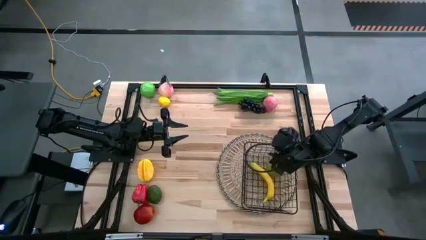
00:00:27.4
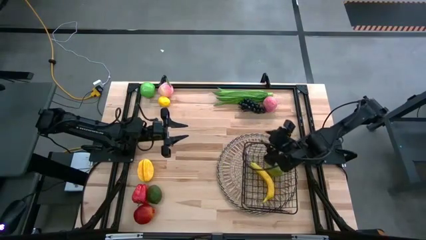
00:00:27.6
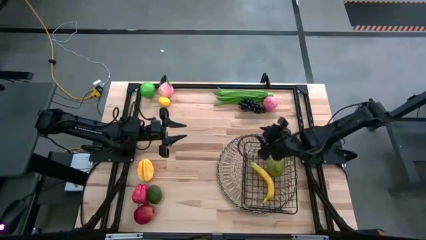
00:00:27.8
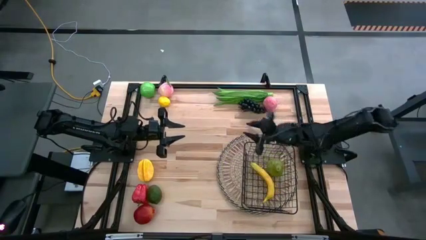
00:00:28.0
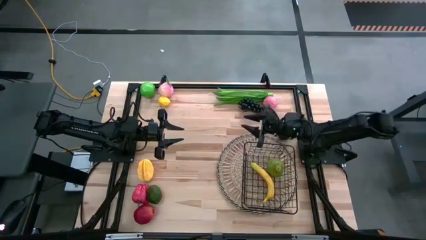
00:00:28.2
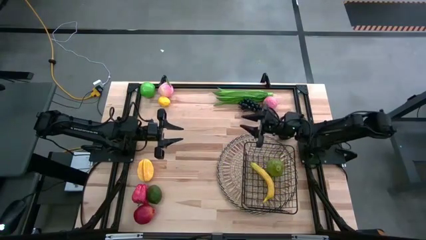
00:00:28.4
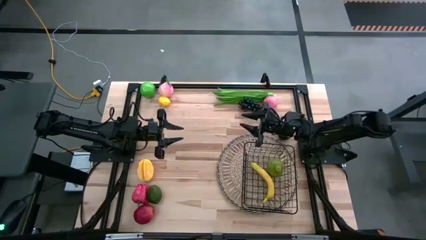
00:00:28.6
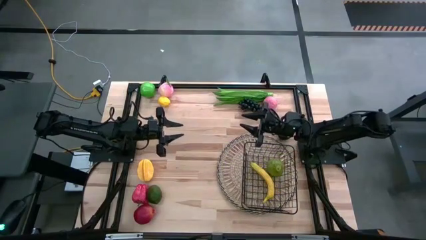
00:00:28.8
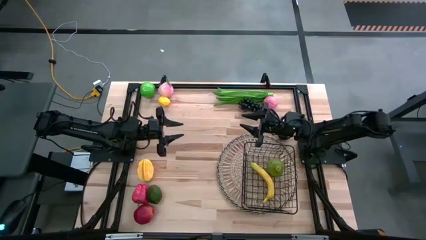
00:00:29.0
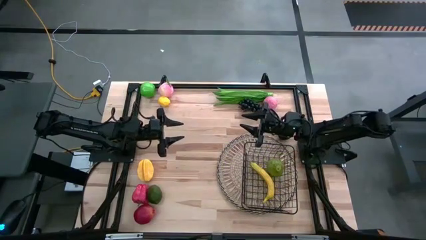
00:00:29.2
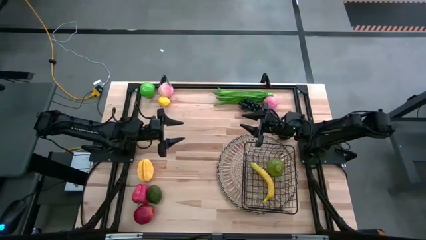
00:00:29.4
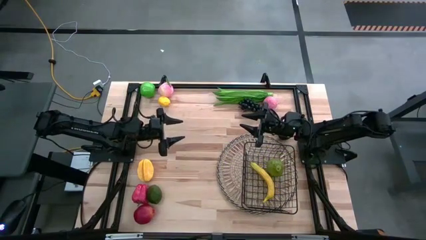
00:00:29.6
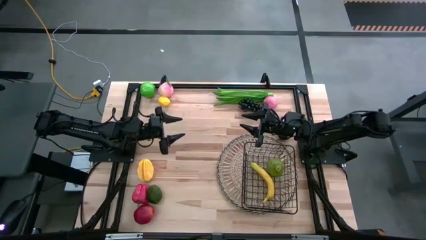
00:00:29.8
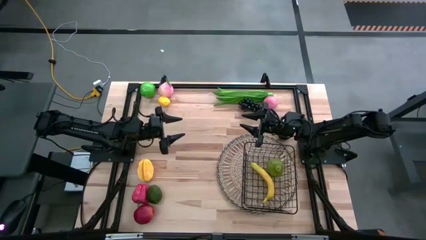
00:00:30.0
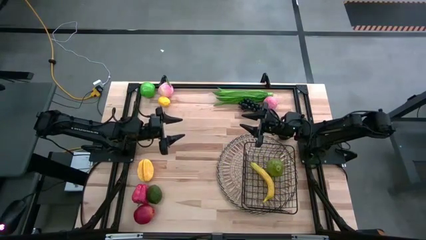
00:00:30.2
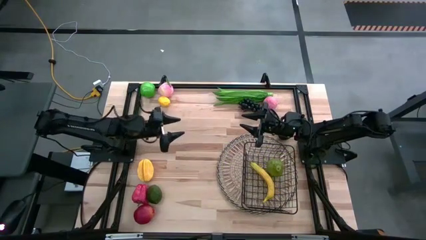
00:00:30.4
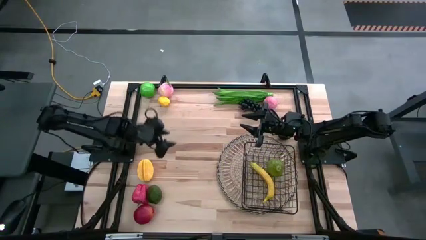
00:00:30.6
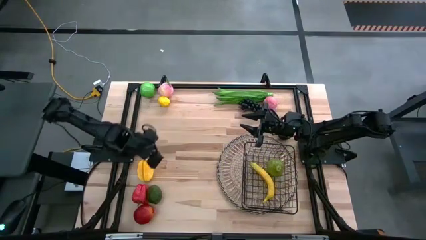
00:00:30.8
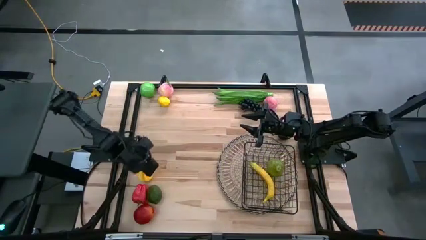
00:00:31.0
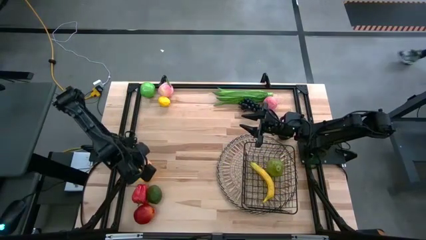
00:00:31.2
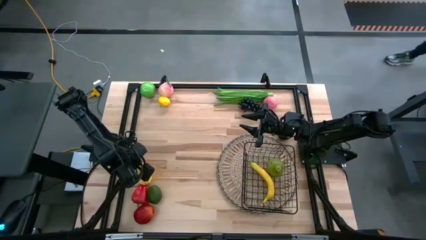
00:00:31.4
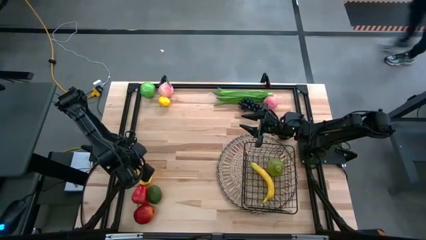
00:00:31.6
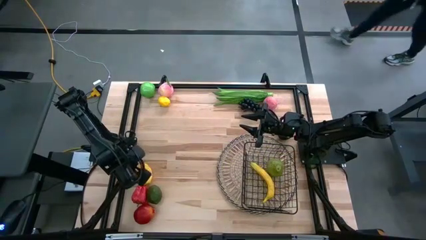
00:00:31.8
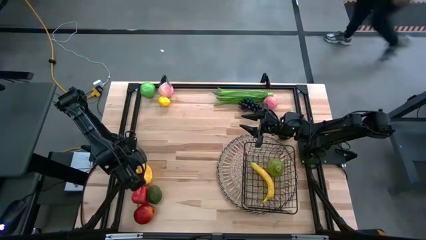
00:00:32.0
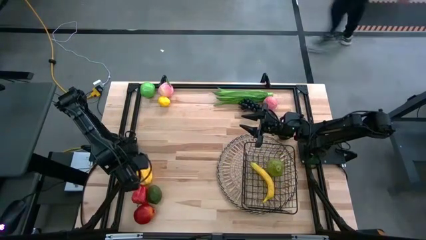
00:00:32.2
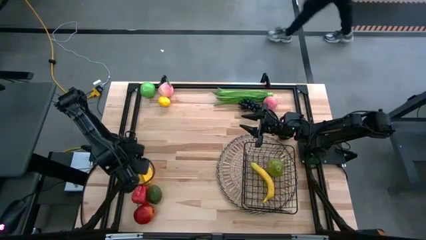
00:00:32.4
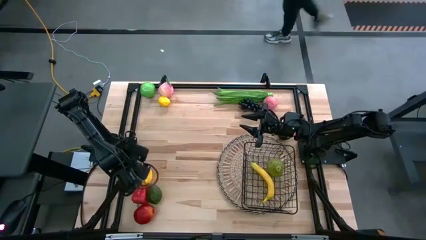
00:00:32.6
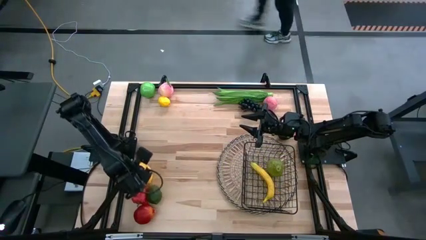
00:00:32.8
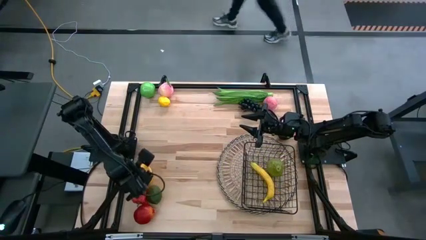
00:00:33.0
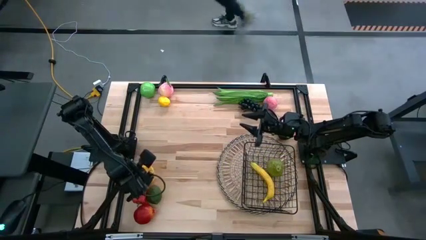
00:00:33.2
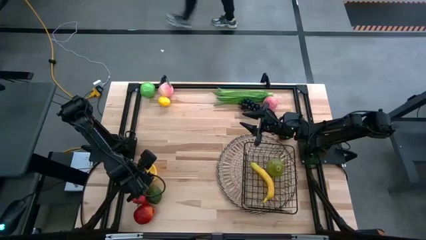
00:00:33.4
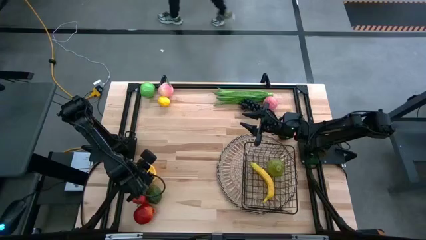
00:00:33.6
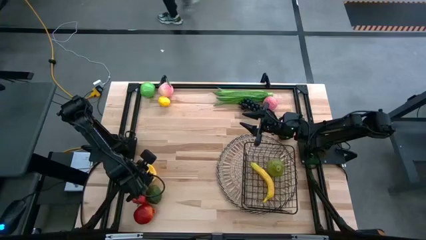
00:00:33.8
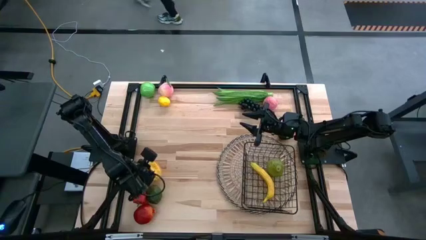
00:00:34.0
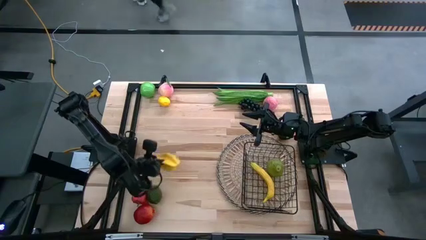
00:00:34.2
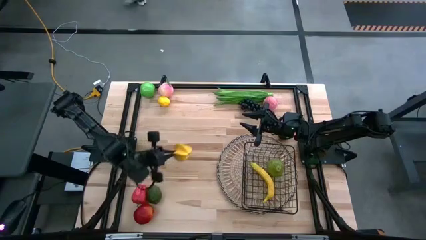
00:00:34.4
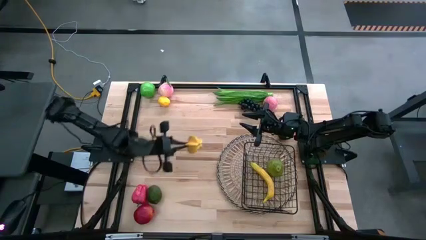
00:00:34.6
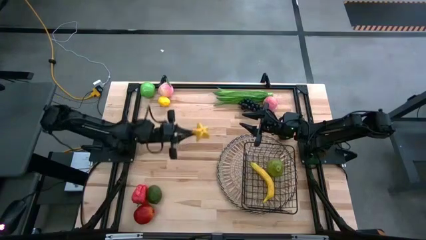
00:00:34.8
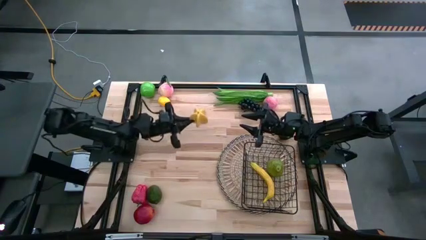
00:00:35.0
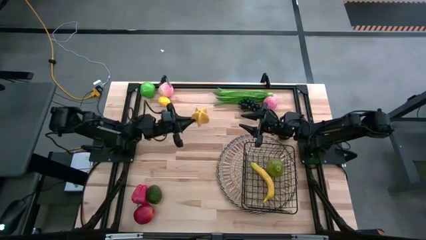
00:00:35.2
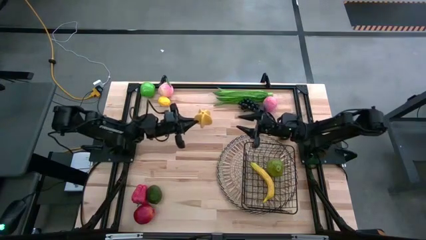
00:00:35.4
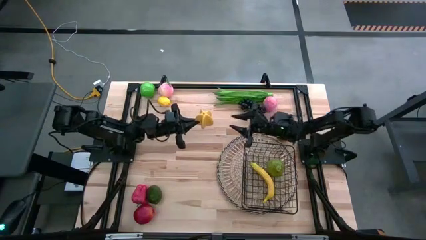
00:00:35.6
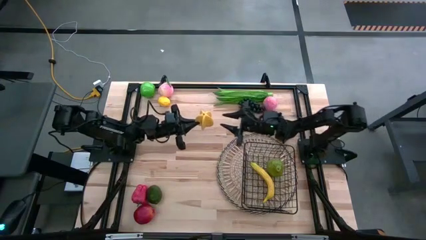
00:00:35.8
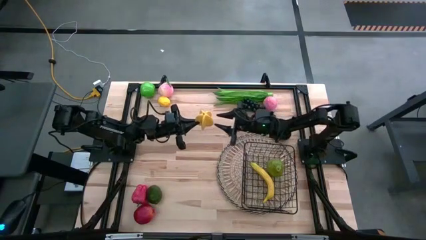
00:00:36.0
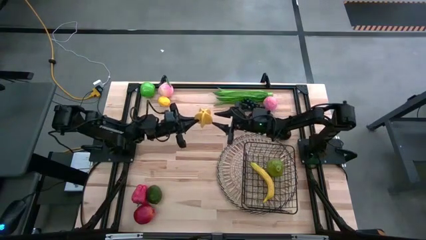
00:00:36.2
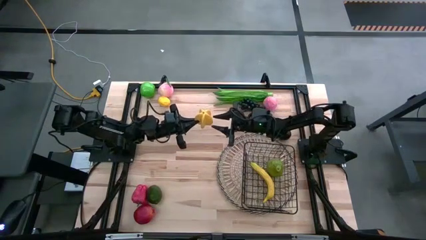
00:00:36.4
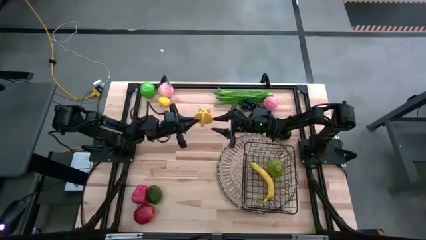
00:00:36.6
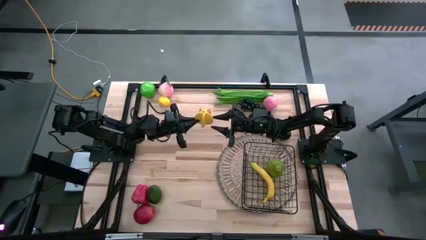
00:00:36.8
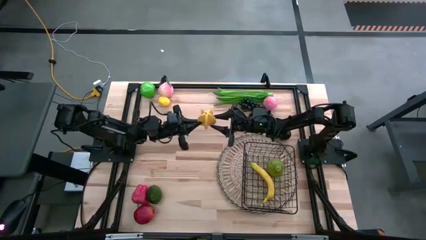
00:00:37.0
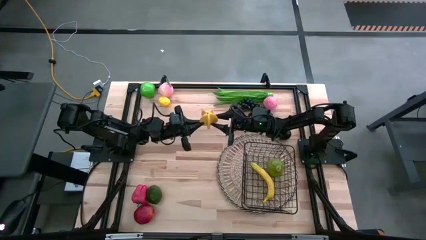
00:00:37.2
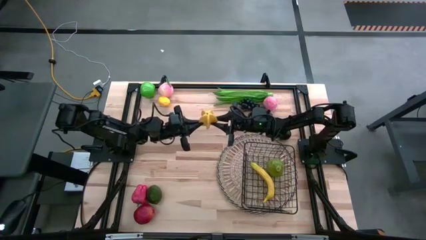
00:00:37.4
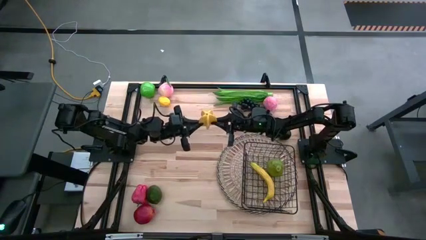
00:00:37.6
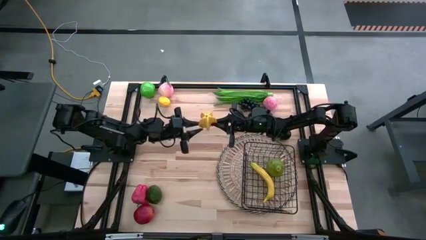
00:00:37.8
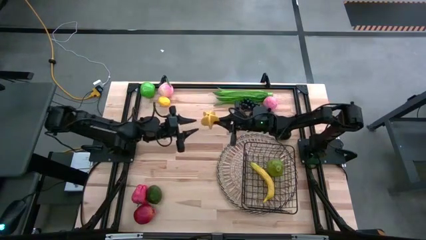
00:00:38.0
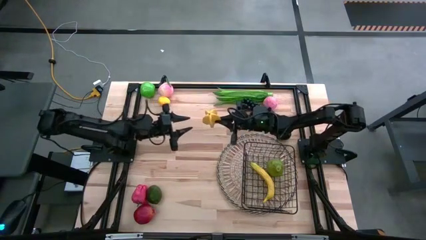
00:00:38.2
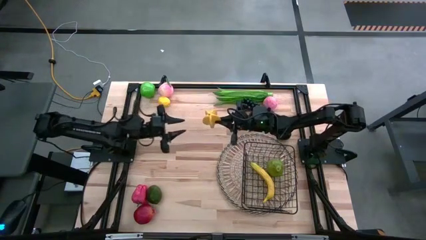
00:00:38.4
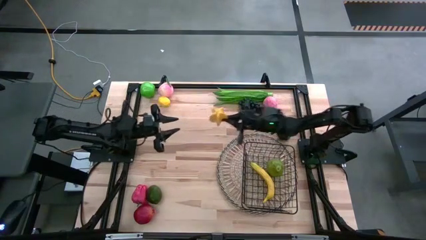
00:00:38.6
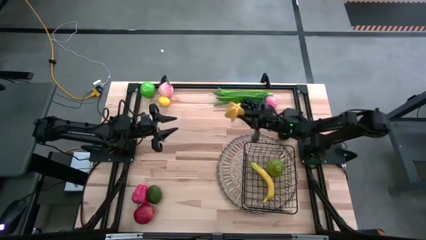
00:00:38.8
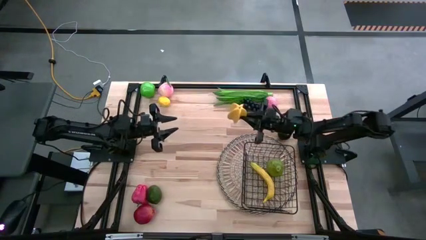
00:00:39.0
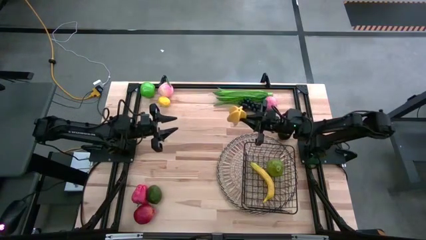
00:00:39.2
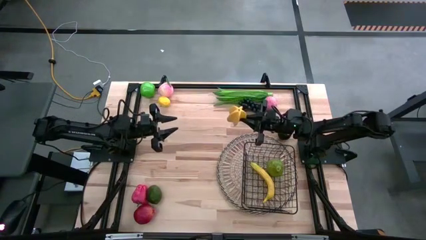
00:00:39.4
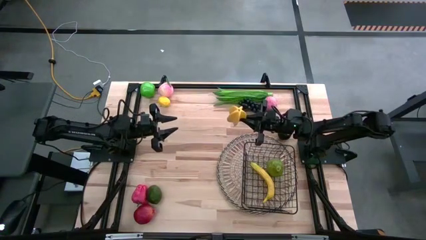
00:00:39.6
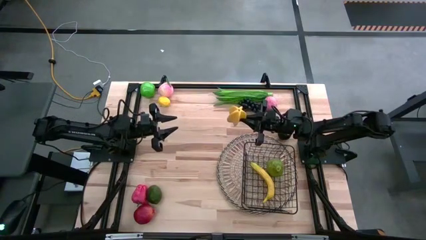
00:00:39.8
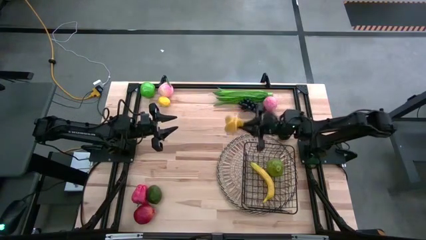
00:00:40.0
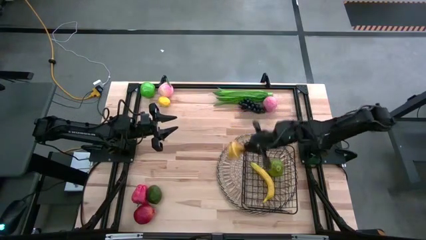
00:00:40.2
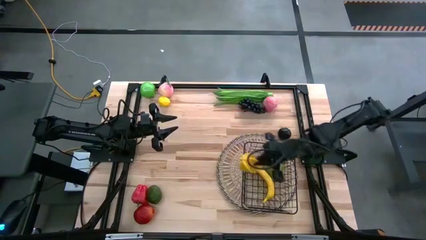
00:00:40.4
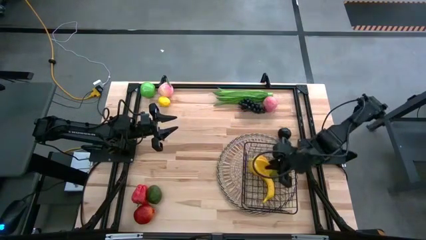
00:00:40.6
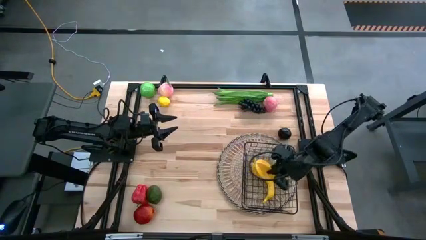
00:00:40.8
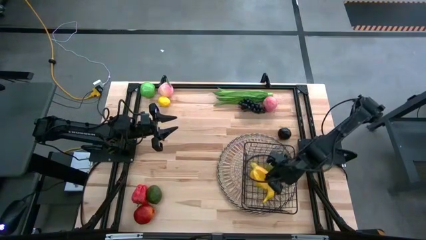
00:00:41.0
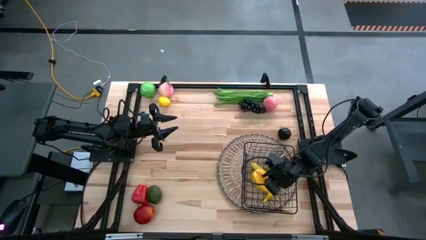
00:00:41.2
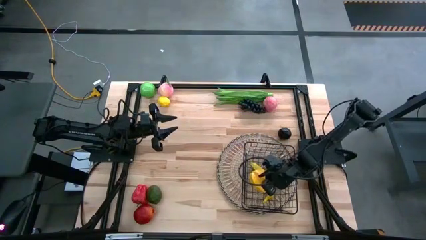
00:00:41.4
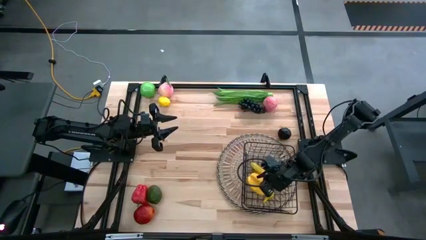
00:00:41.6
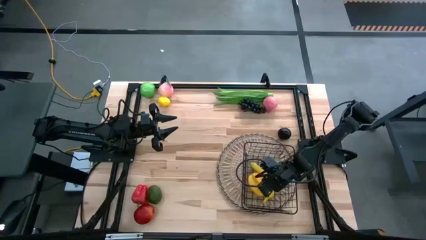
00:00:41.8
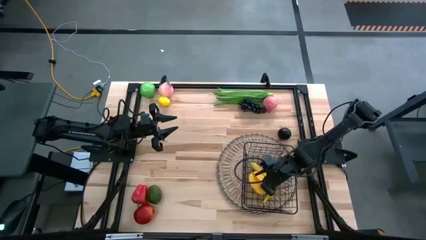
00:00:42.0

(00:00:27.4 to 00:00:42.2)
Task: Build produce basket
Put the starfruit into the wire basket
